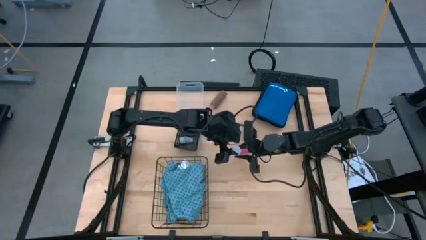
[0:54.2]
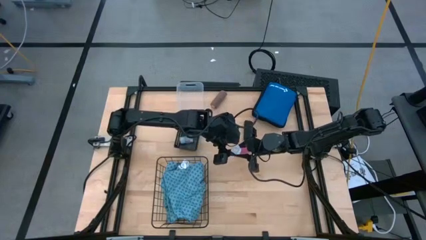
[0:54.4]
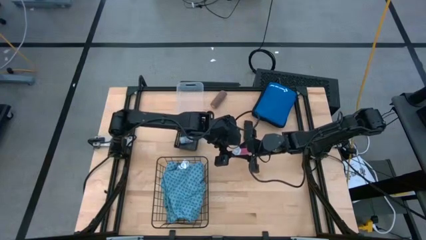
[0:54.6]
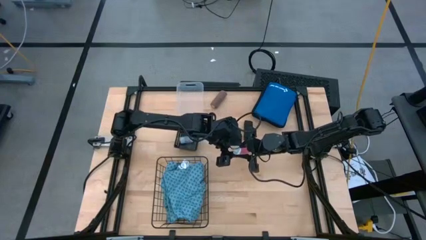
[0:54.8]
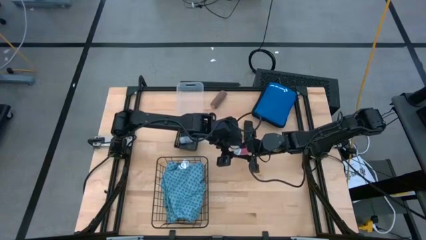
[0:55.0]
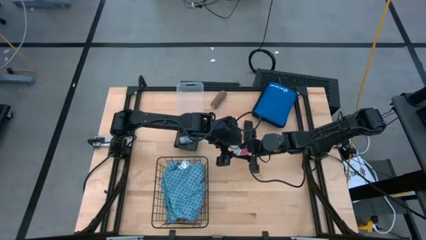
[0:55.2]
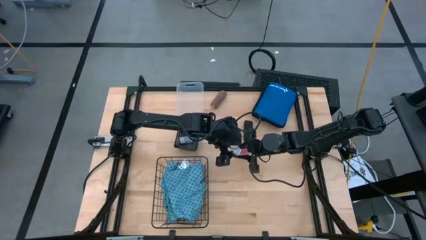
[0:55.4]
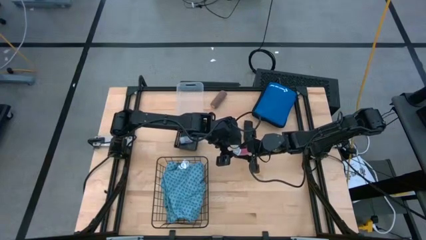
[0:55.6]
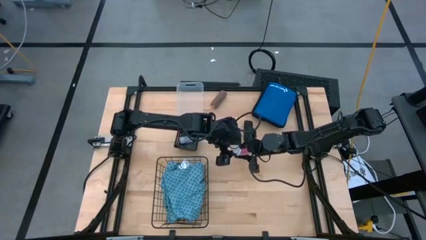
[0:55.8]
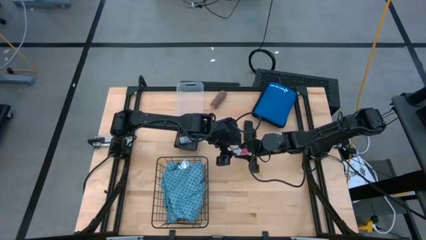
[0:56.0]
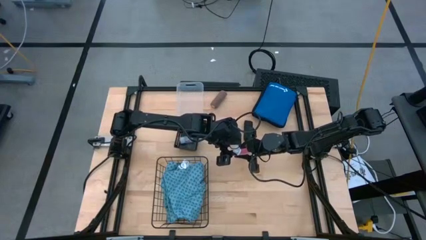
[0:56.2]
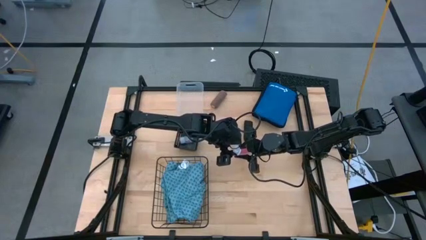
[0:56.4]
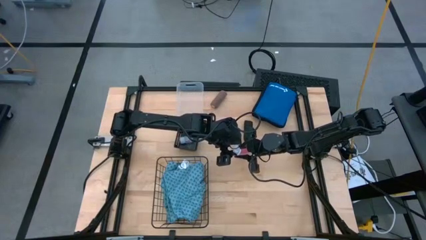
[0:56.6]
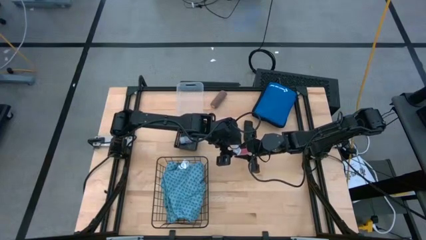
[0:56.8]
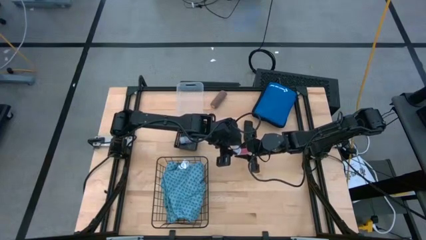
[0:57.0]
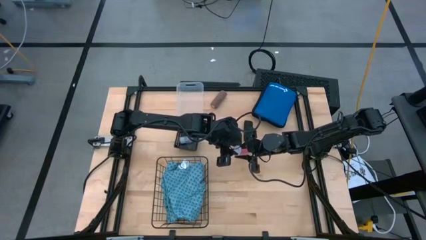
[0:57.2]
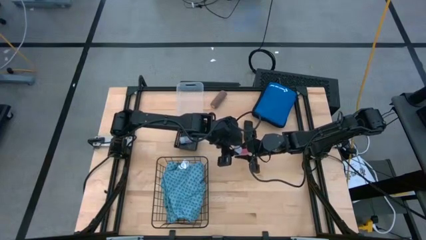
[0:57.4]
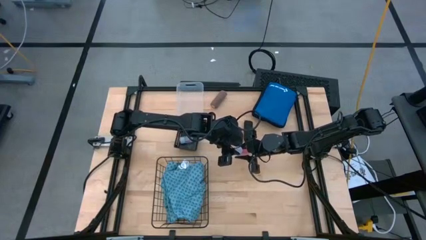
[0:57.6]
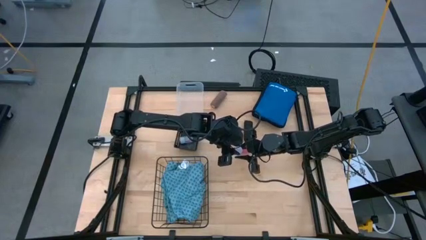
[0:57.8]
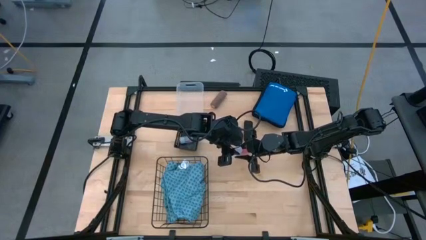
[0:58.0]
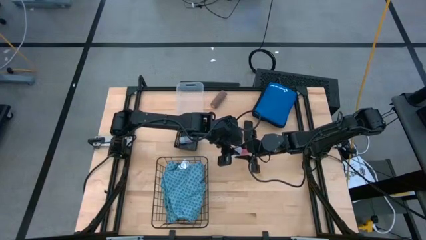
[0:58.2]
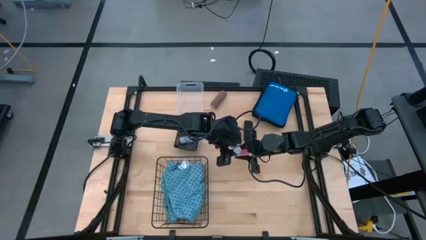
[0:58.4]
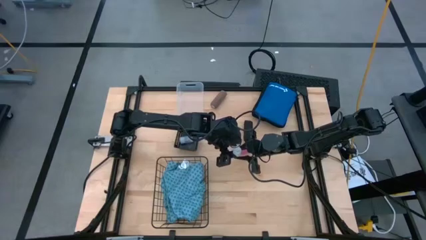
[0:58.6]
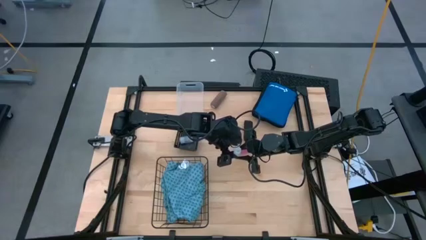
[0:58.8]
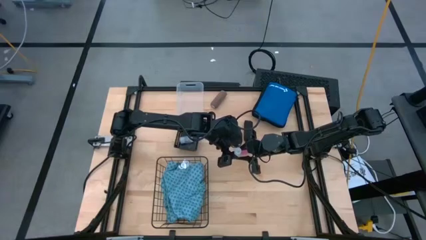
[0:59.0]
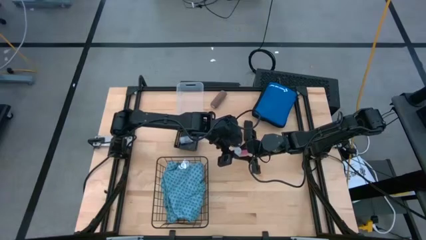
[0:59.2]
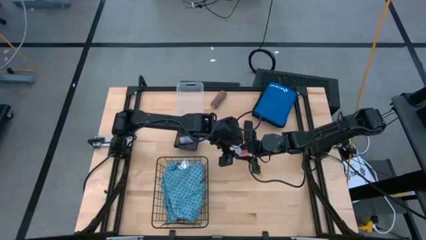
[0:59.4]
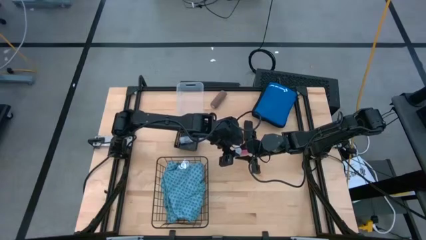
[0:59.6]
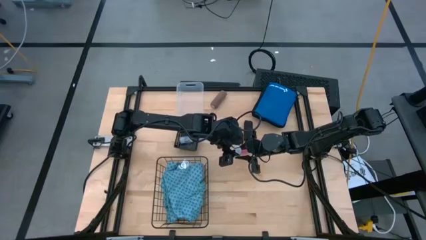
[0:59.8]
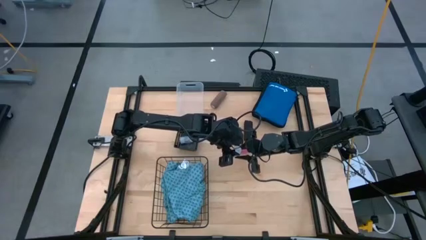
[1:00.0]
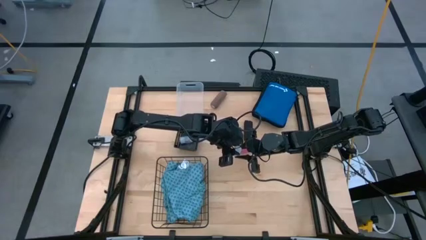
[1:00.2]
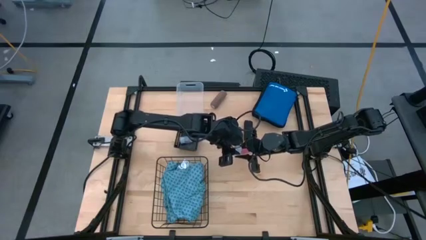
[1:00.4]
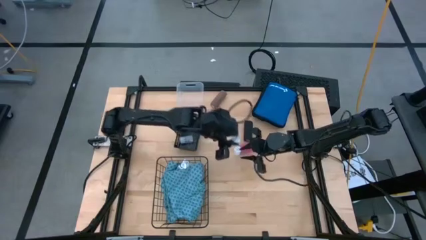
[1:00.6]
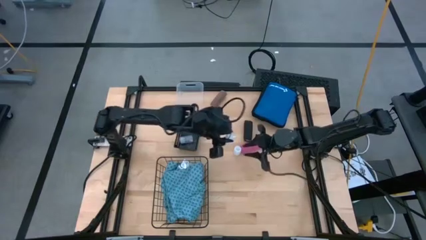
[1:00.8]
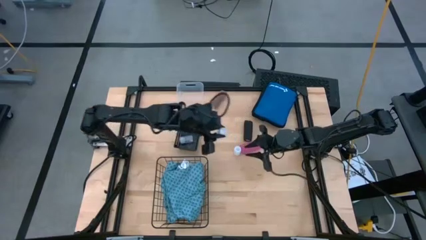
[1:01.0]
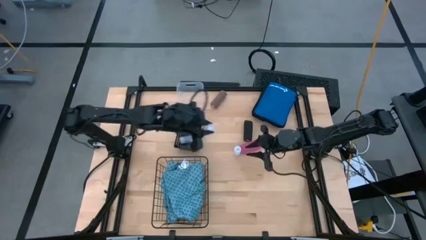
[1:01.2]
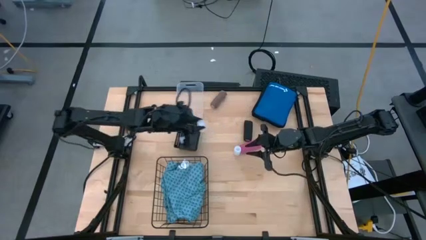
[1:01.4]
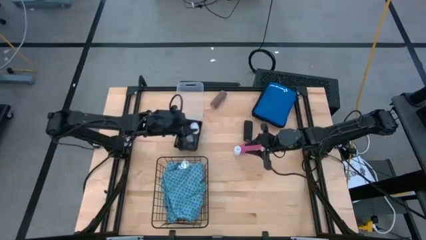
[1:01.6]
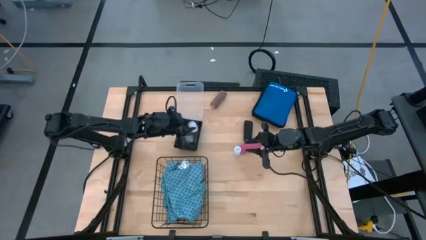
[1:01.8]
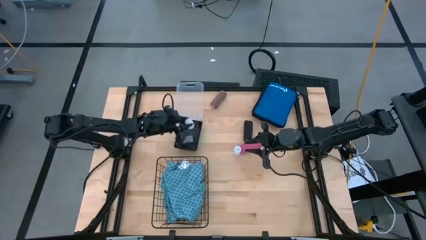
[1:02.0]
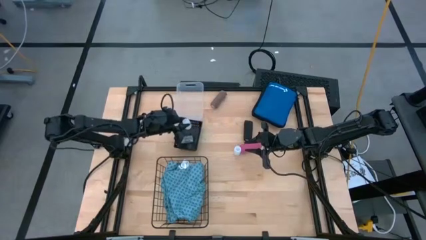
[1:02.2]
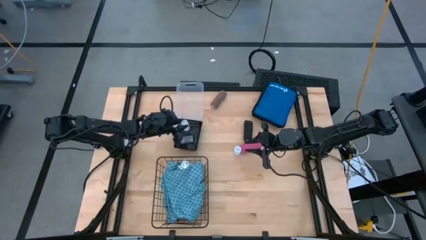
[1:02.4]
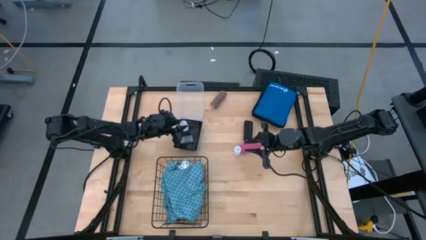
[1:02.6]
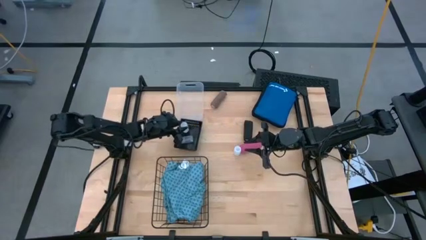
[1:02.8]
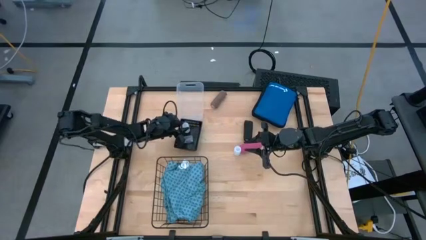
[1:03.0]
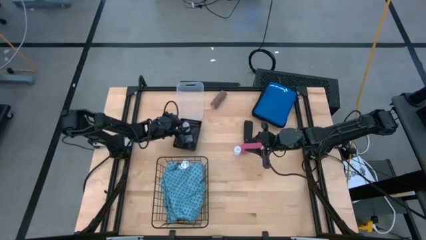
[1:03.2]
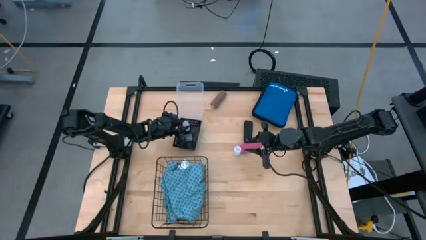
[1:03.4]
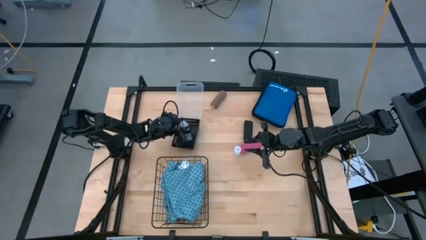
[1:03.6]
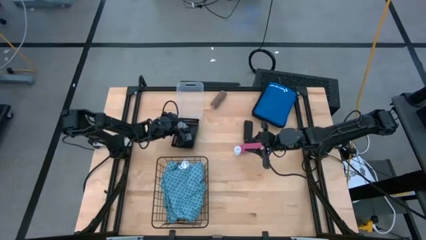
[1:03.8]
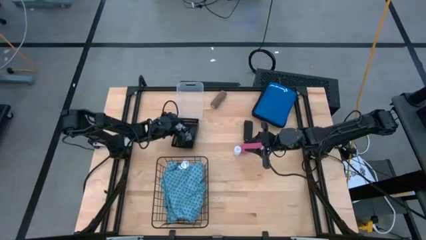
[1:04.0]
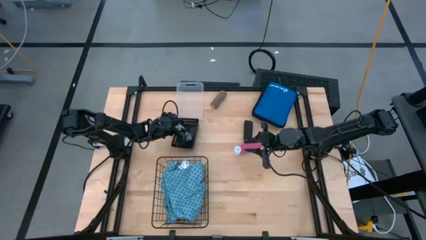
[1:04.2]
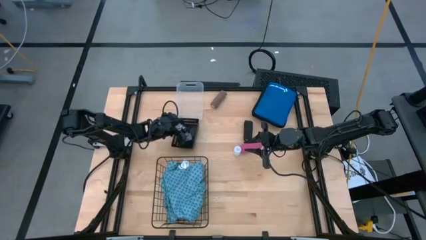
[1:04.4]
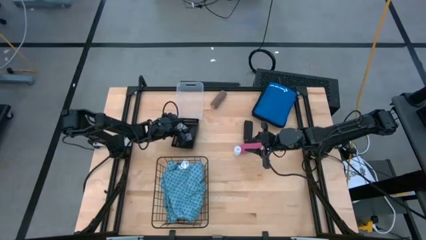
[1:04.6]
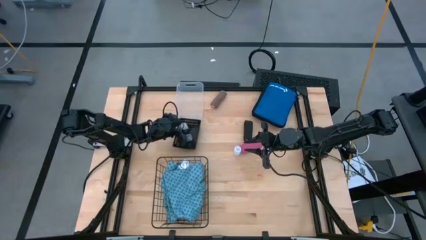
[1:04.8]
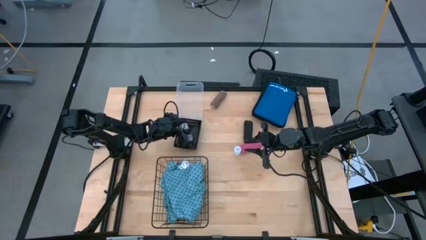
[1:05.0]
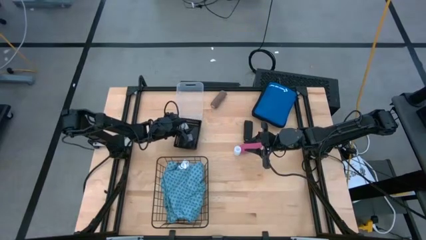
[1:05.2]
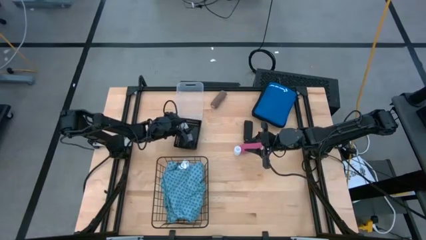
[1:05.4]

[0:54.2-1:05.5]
Task: Pick & place medical supplies in basket/bin
Put the bottom white pill bottle into the black bin
